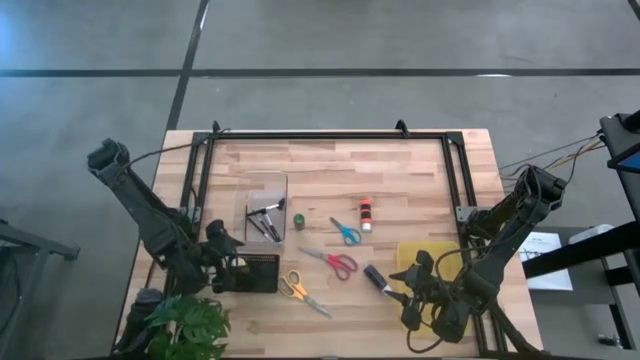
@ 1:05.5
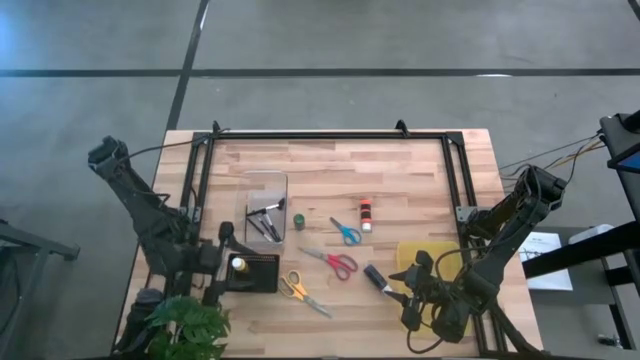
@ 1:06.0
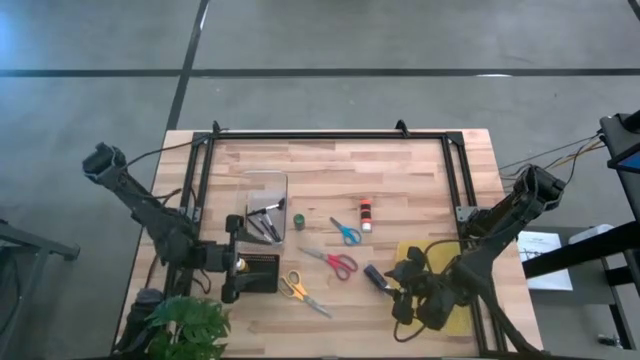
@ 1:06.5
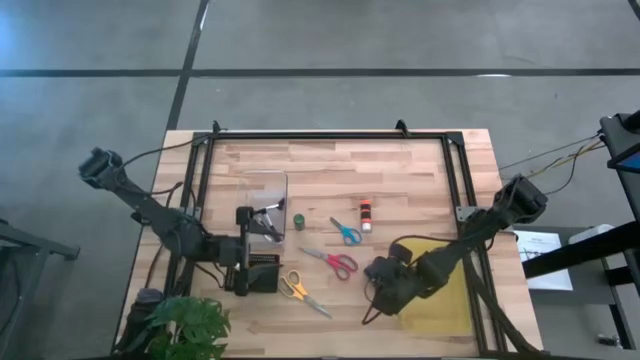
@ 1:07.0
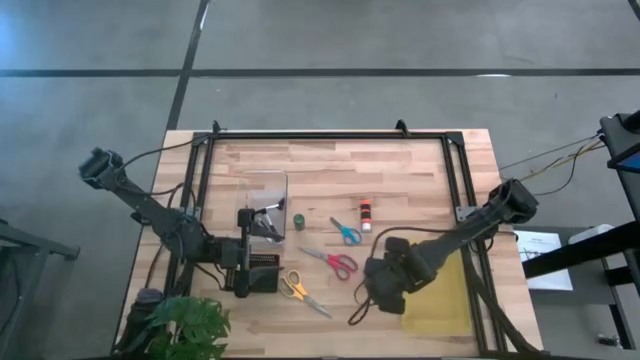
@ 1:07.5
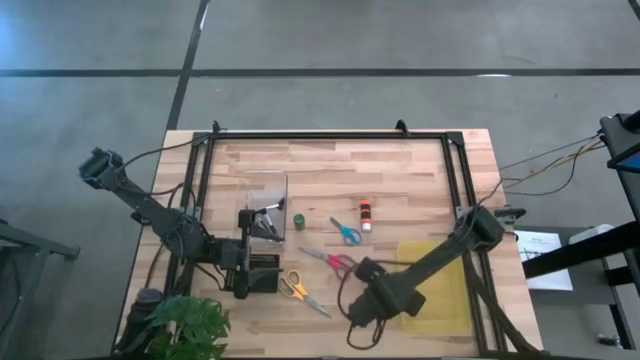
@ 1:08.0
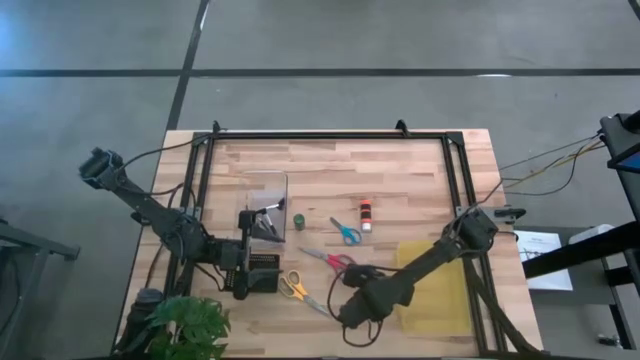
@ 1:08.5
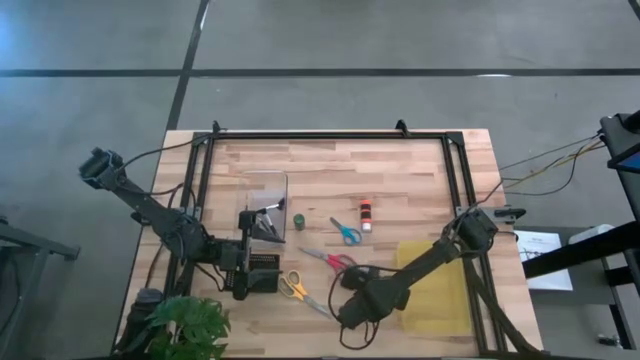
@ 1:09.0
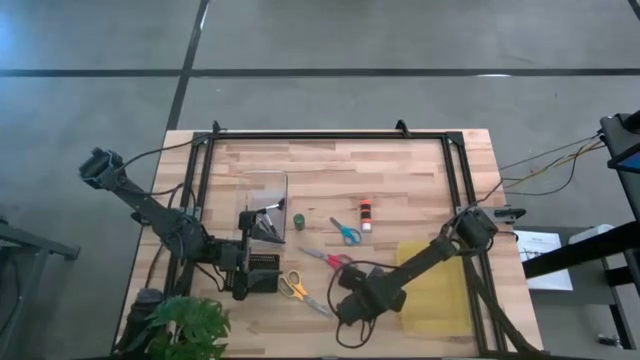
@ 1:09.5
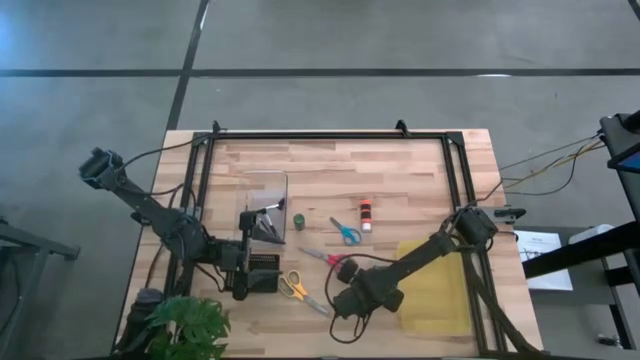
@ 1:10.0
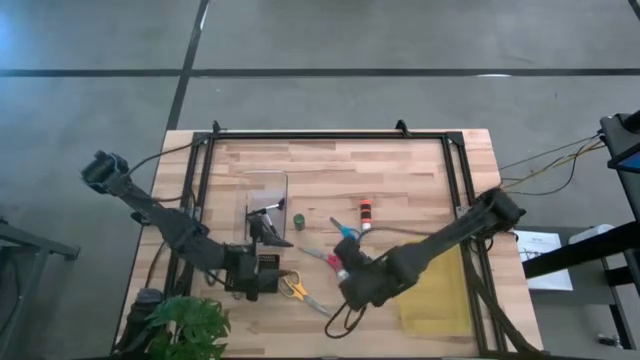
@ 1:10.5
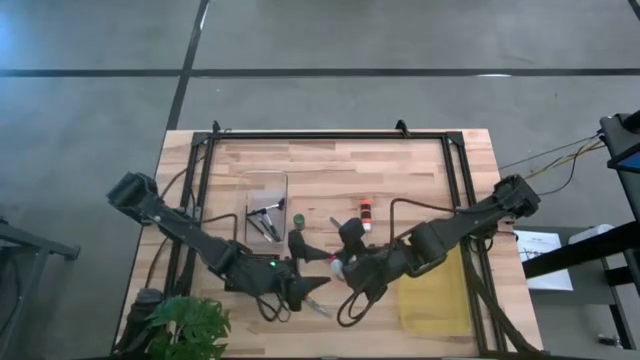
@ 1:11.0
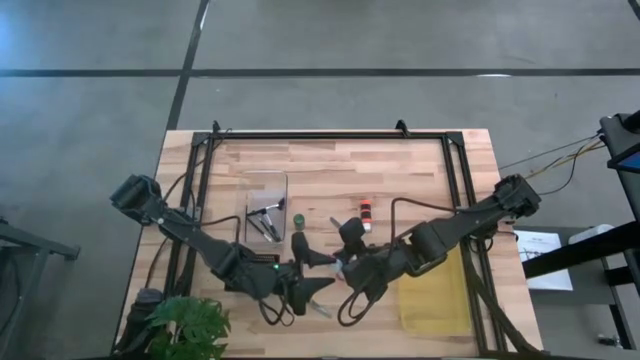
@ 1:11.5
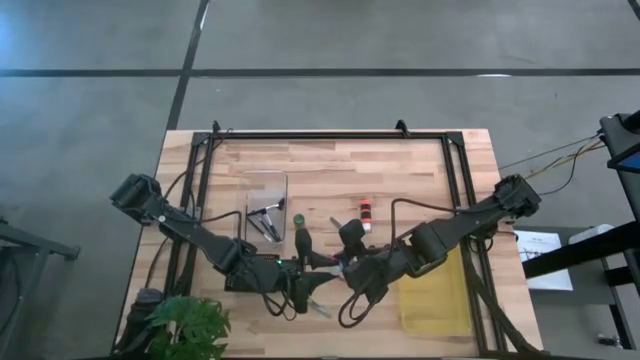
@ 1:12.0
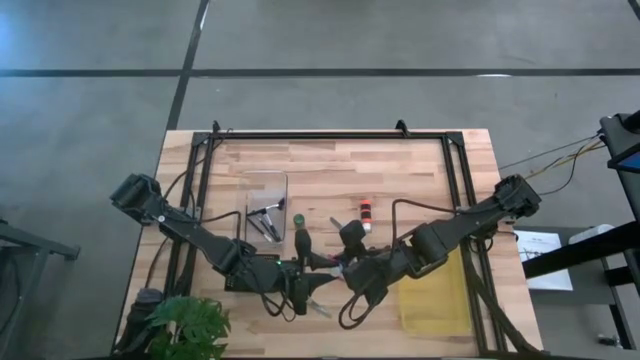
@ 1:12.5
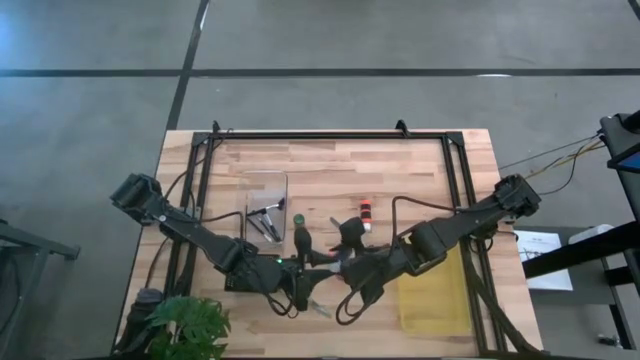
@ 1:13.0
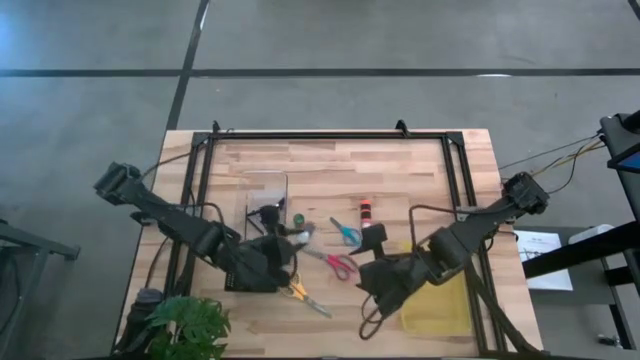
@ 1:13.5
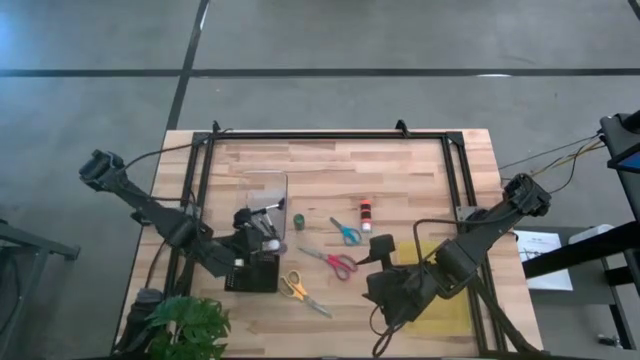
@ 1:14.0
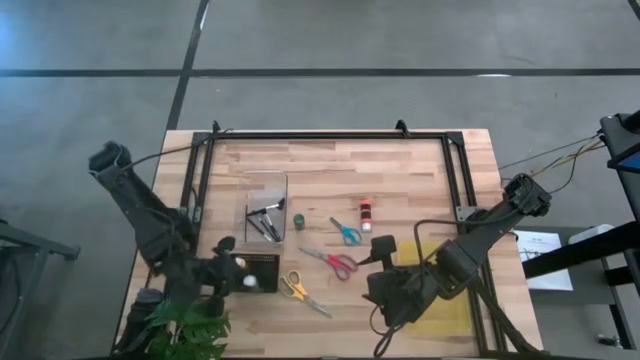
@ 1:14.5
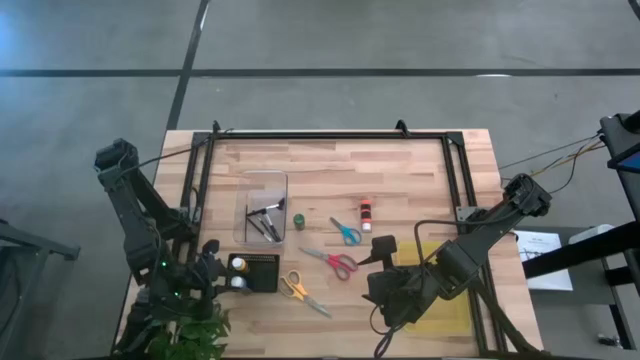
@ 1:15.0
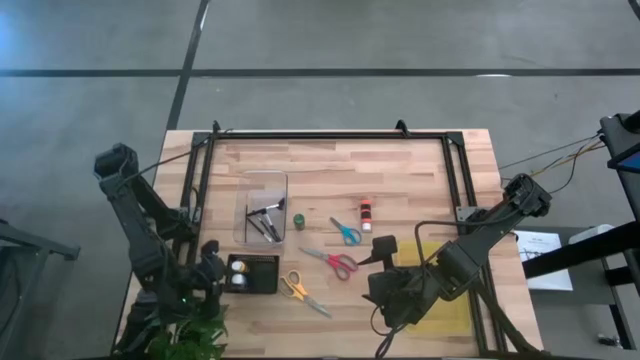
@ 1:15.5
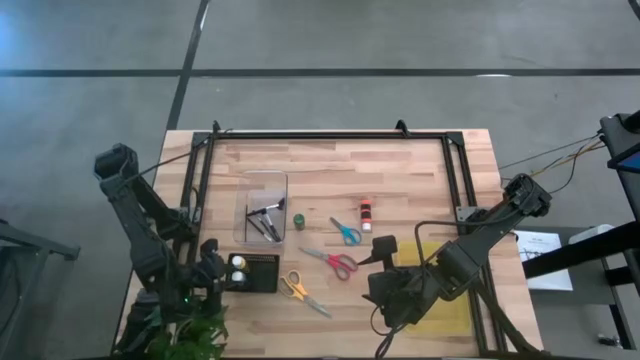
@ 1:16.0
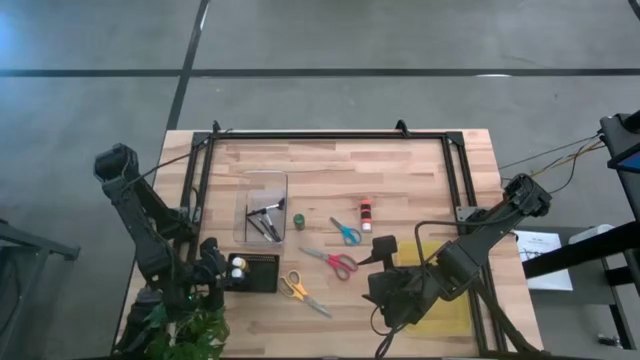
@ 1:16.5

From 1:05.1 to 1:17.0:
Task: Pick & Place Paint Supplies
Put the blue paint bottle into the black basket

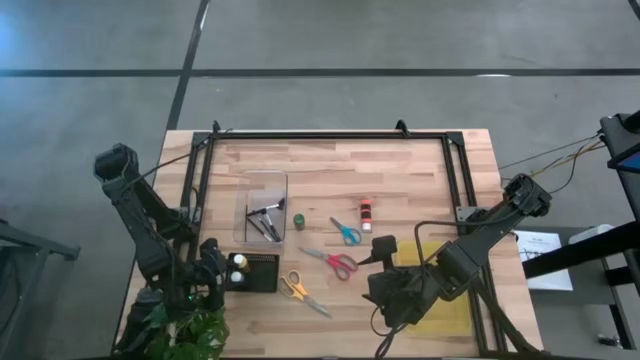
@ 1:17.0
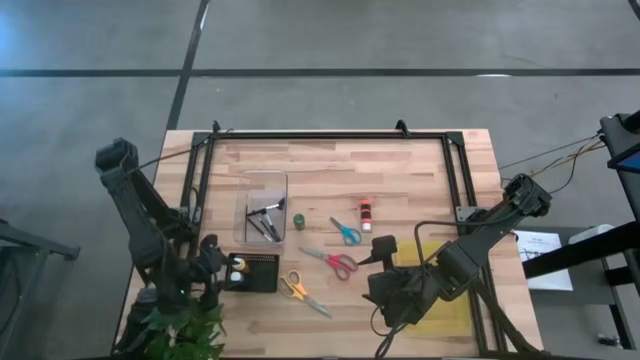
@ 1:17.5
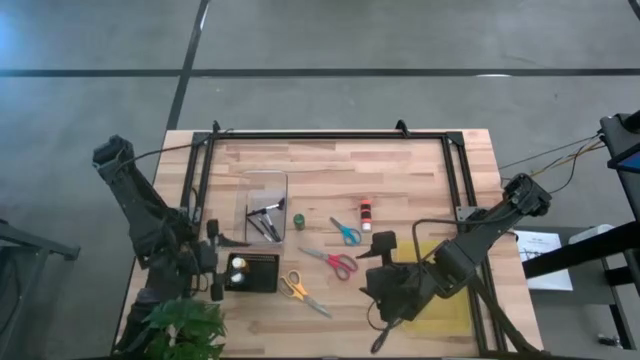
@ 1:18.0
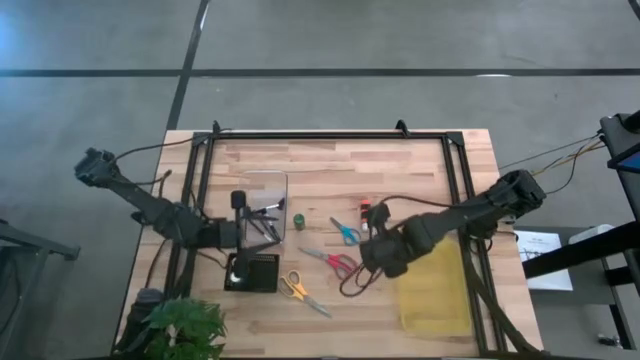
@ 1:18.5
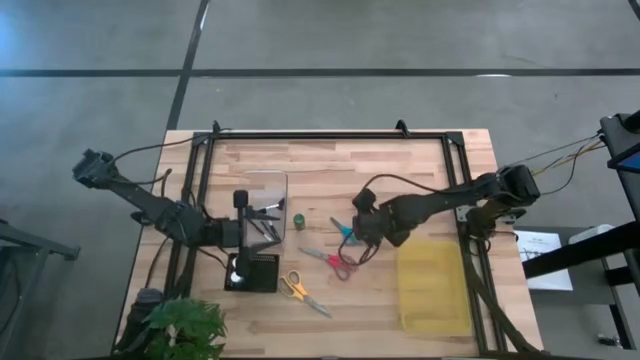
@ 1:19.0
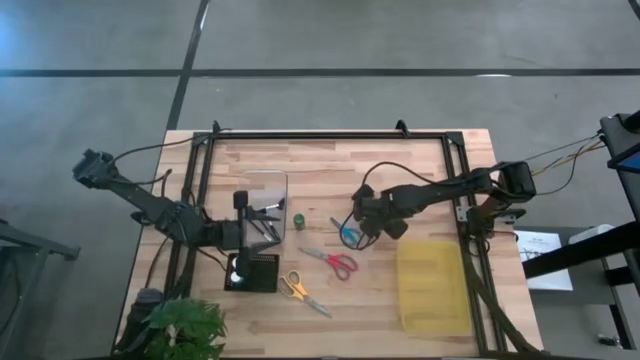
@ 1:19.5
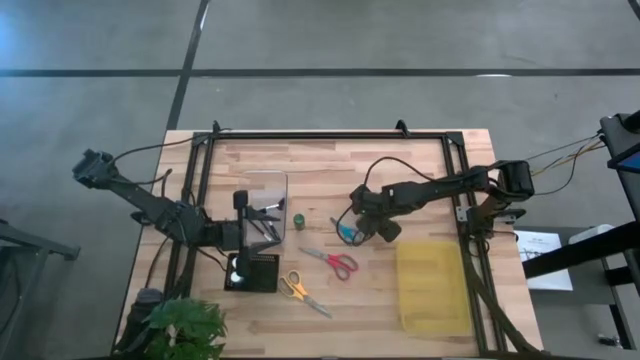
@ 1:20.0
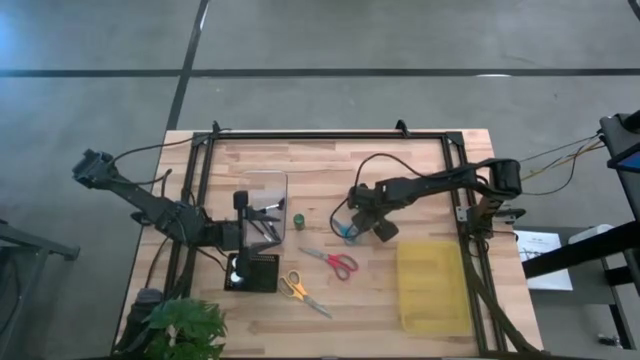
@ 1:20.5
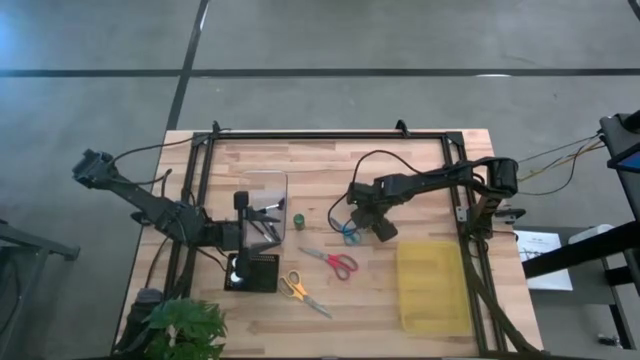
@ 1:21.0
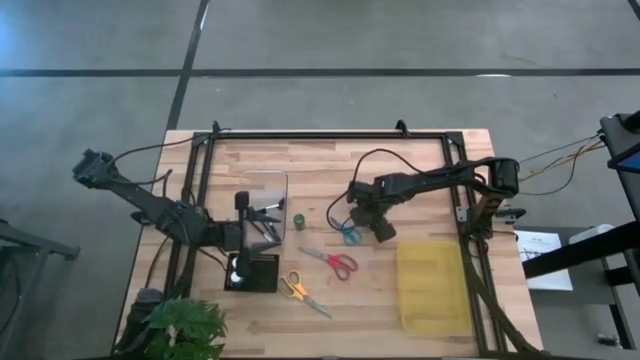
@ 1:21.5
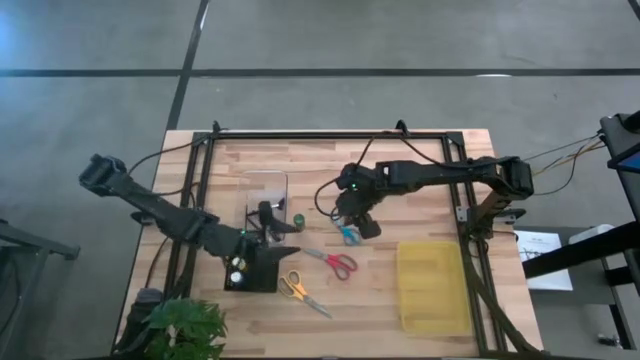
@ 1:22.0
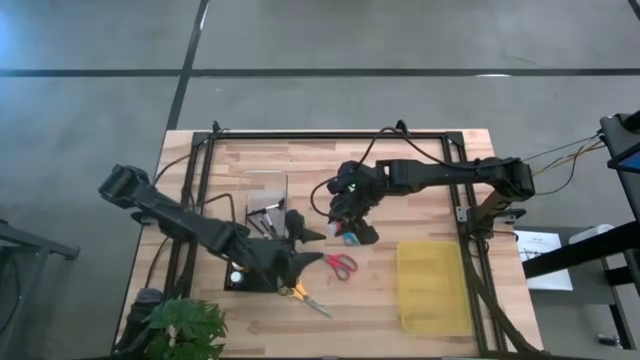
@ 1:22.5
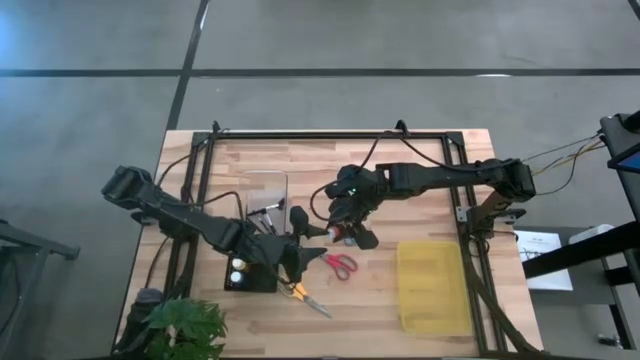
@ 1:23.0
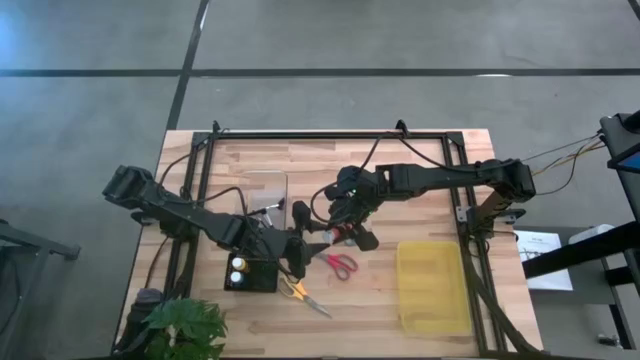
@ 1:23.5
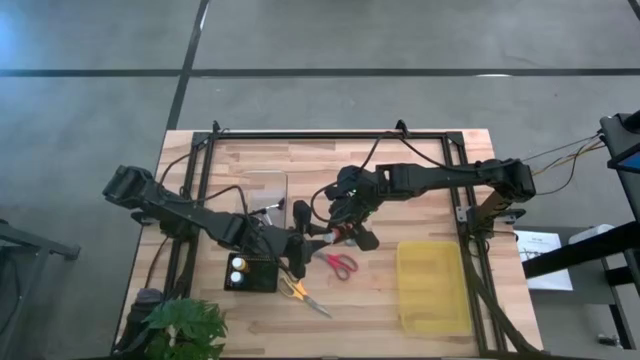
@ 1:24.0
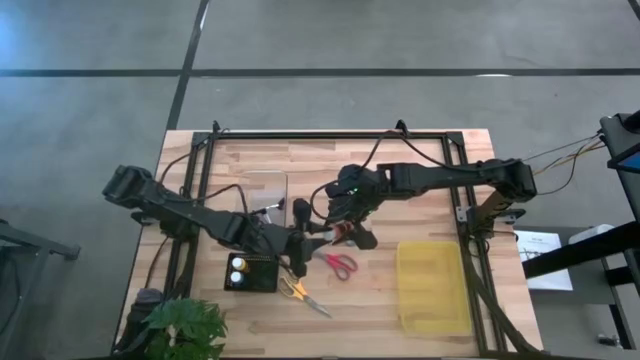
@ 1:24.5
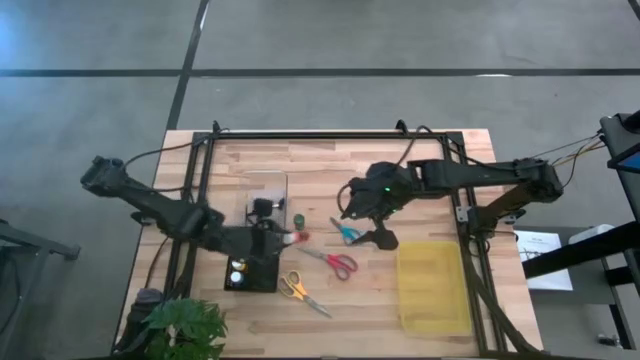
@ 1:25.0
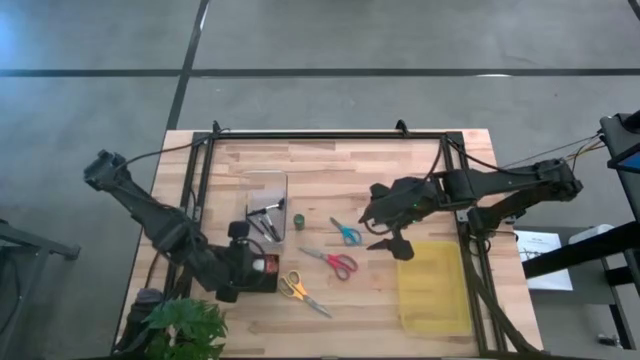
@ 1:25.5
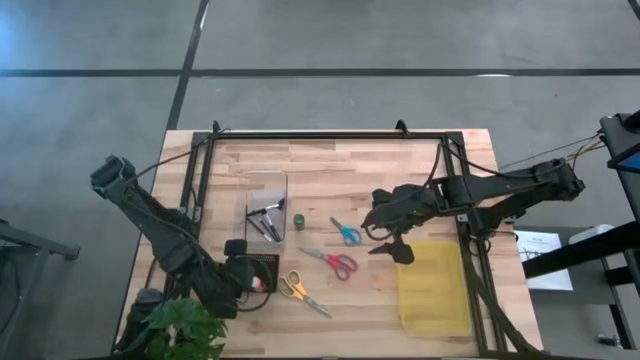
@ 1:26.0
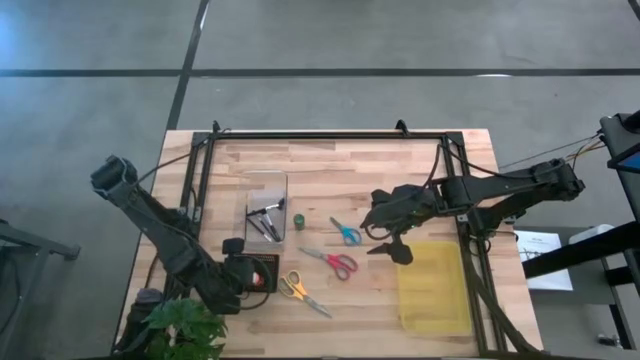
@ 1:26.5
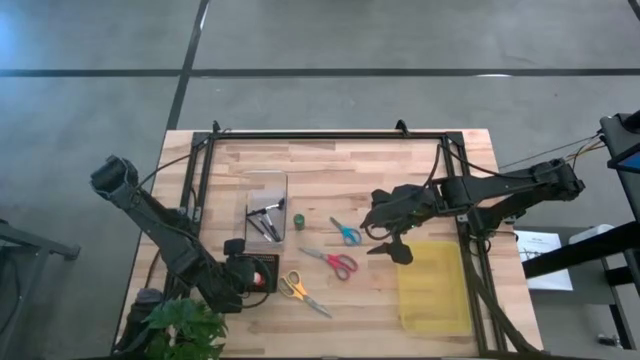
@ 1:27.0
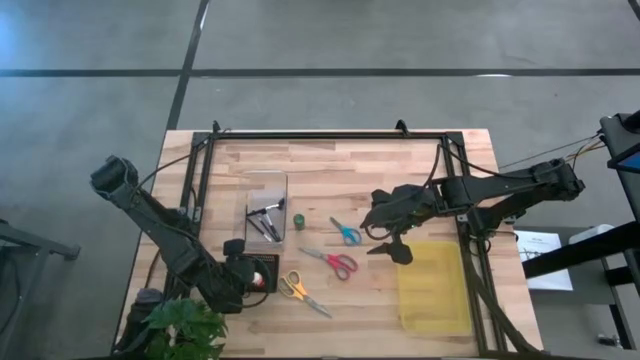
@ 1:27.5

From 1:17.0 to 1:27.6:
Put the orange paint bottle into the black basket
